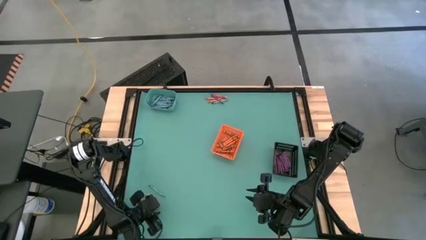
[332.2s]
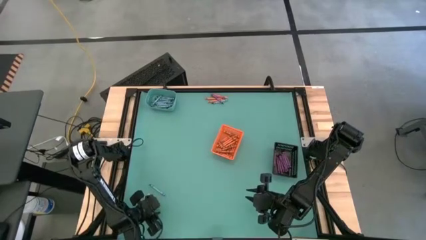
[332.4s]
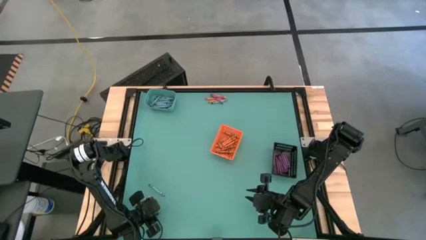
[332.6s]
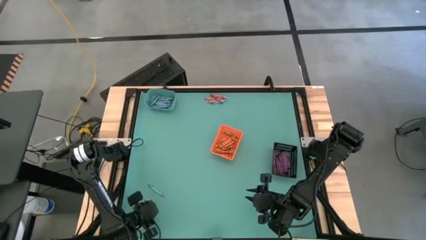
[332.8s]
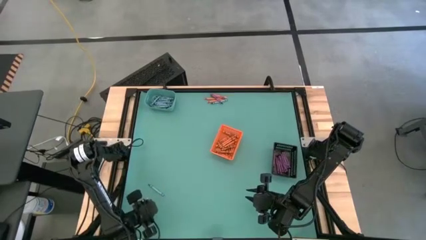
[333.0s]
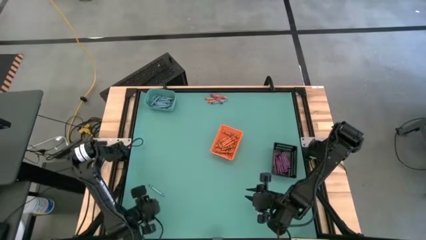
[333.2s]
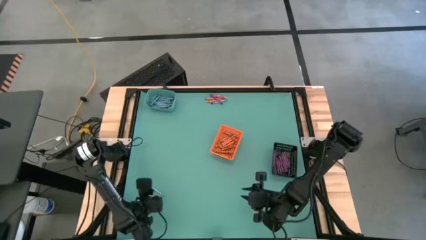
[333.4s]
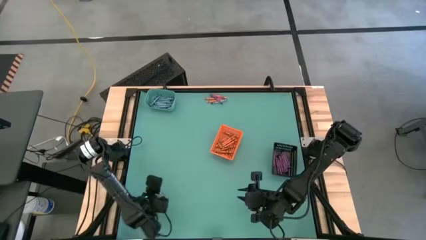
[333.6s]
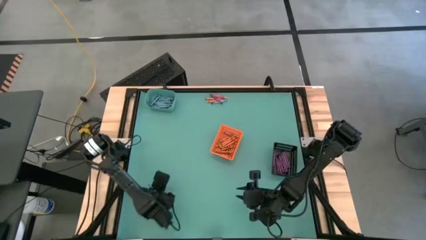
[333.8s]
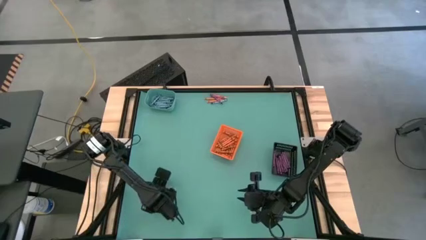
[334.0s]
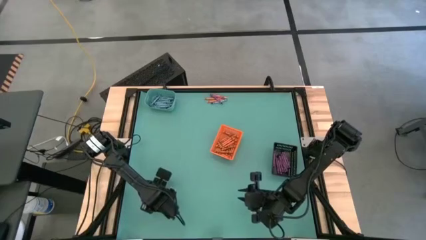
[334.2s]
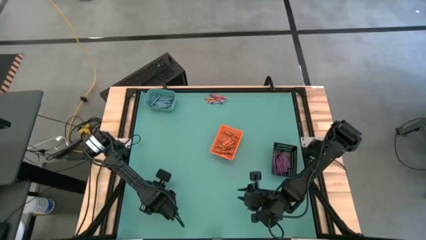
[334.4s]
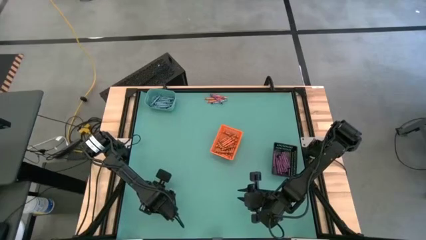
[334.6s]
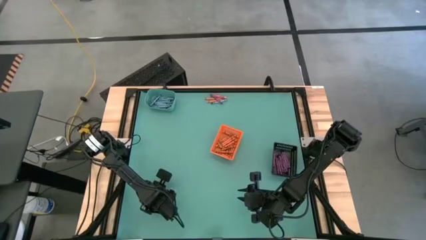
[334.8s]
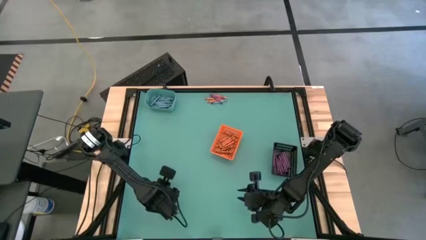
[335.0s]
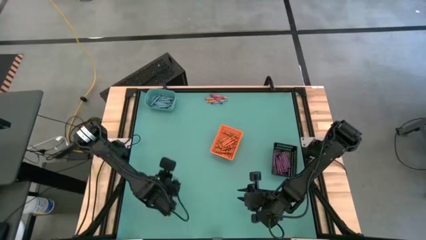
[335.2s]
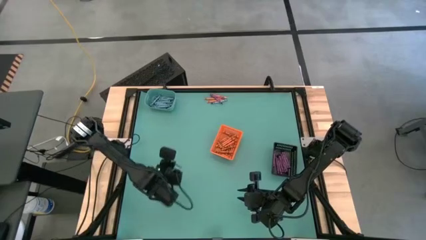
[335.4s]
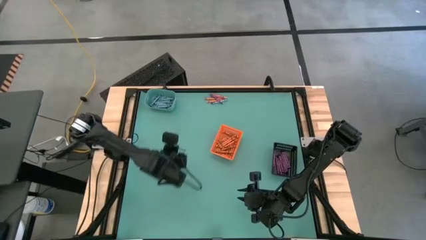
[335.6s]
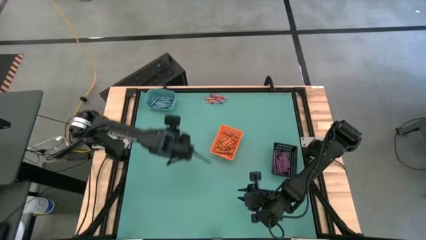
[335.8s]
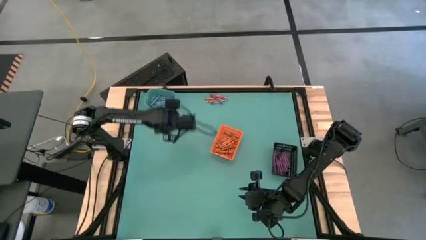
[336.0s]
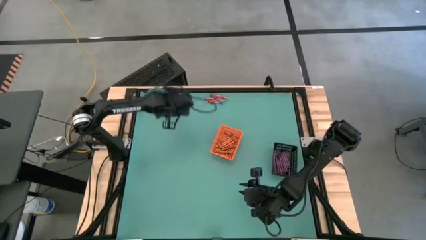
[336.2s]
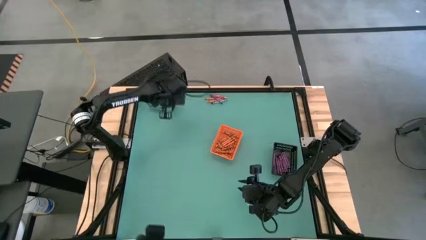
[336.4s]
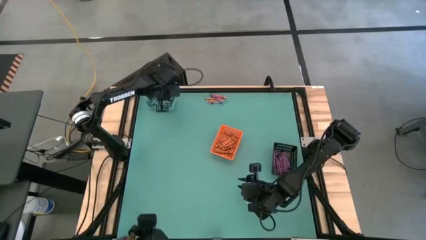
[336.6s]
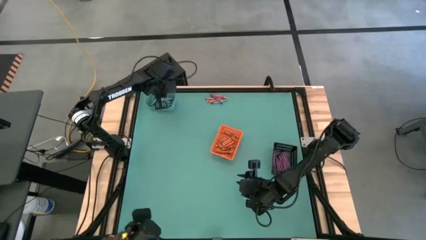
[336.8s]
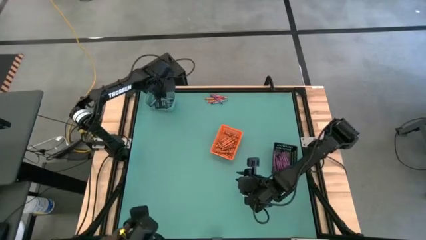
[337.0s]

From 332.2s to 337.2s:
Task: Sort crayons
Put the blue crayon into the blue bin

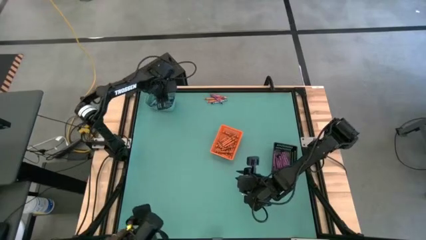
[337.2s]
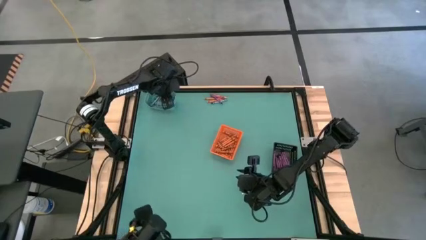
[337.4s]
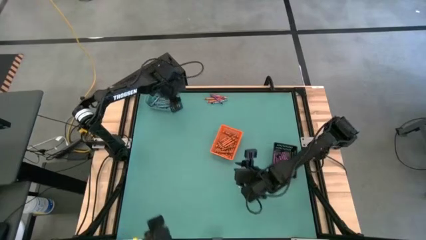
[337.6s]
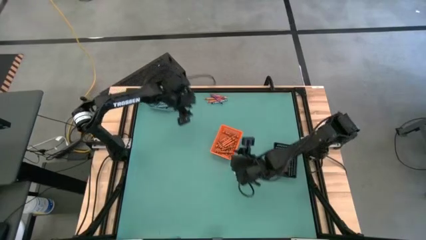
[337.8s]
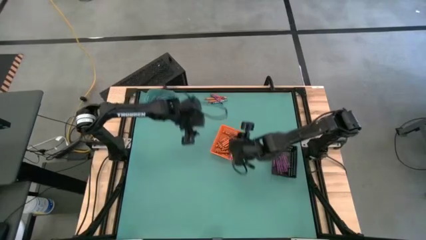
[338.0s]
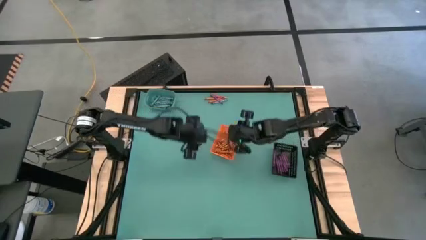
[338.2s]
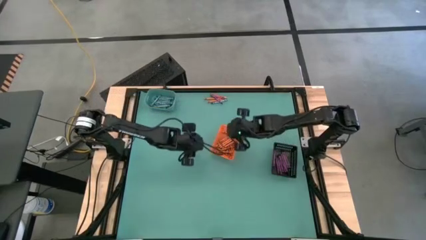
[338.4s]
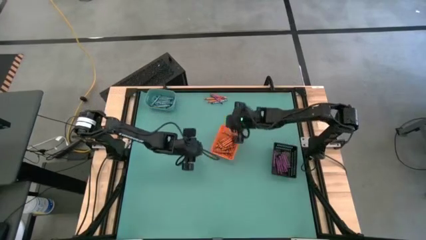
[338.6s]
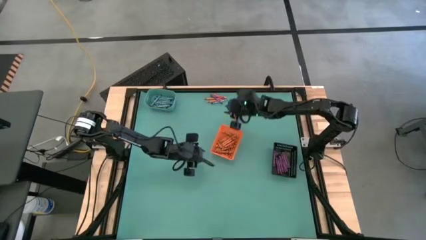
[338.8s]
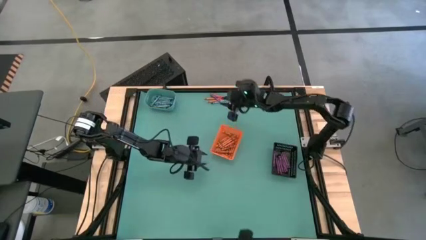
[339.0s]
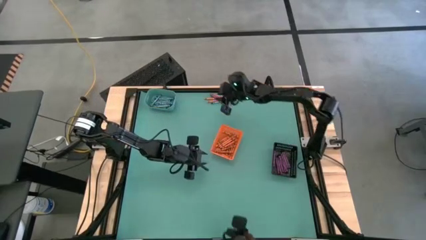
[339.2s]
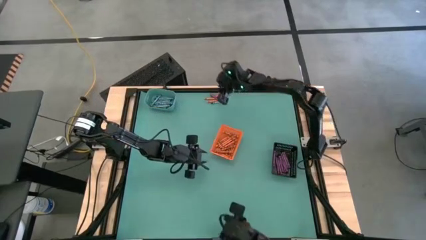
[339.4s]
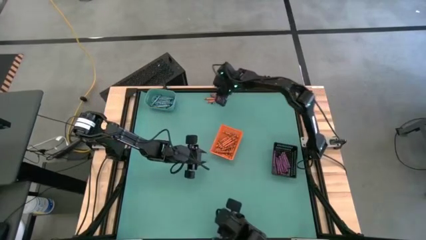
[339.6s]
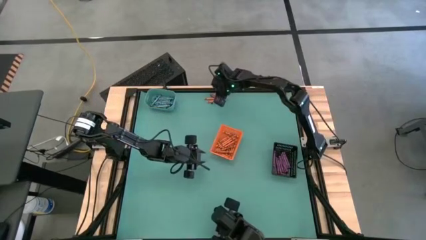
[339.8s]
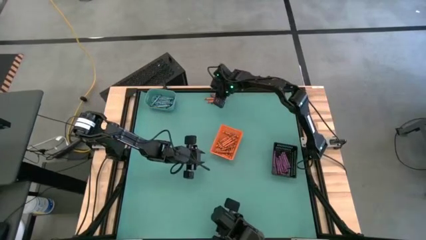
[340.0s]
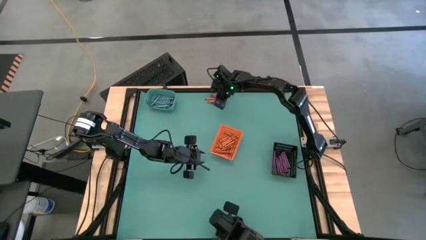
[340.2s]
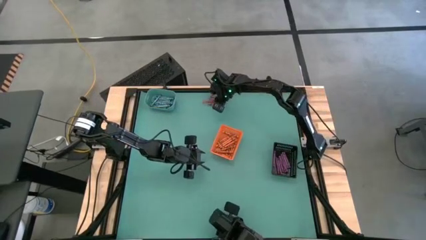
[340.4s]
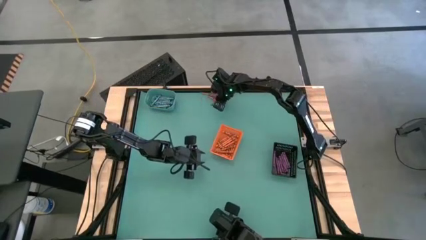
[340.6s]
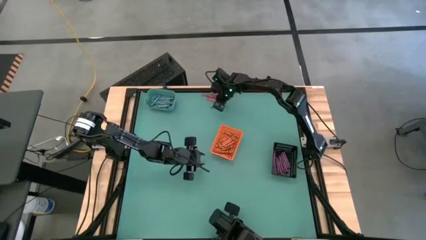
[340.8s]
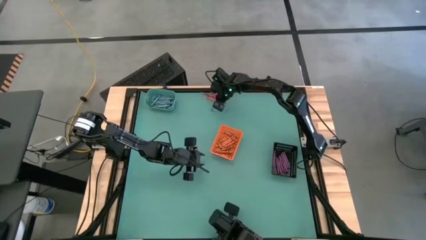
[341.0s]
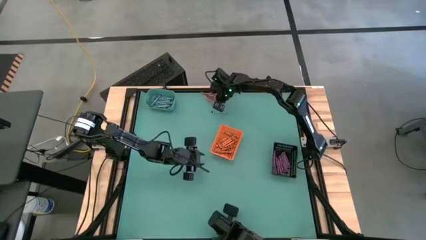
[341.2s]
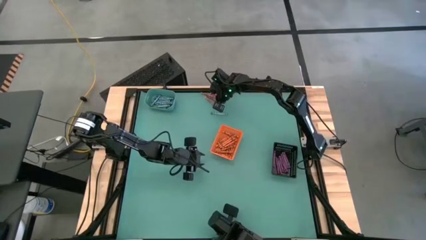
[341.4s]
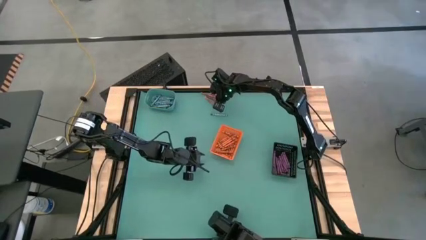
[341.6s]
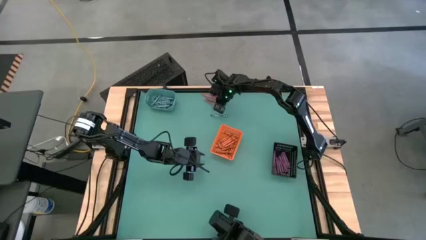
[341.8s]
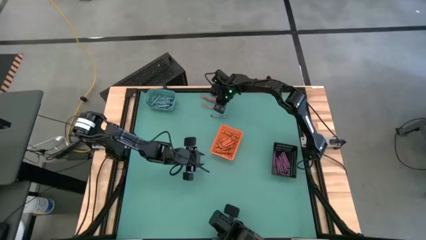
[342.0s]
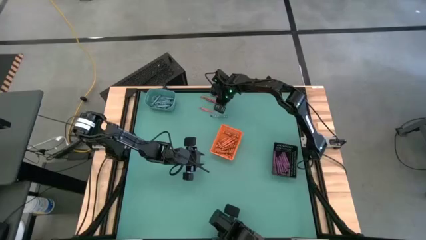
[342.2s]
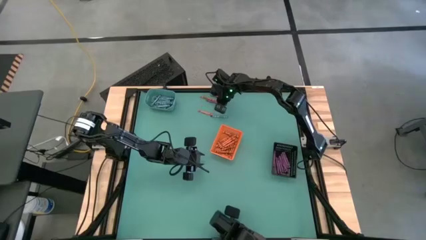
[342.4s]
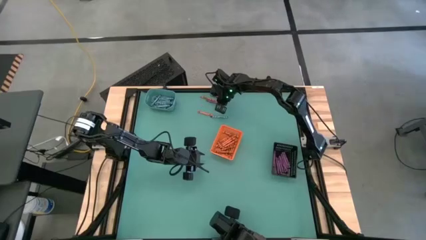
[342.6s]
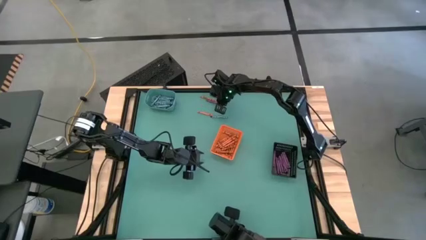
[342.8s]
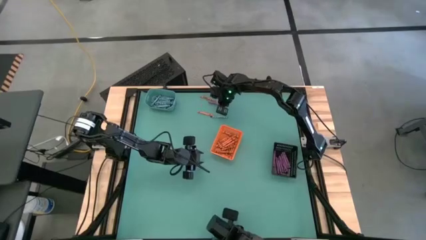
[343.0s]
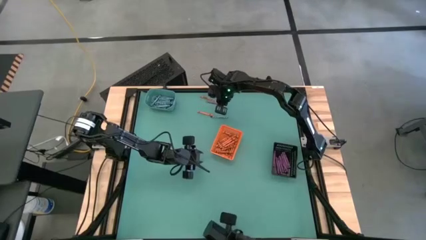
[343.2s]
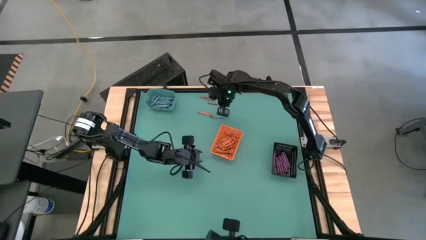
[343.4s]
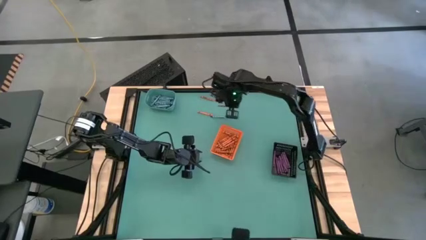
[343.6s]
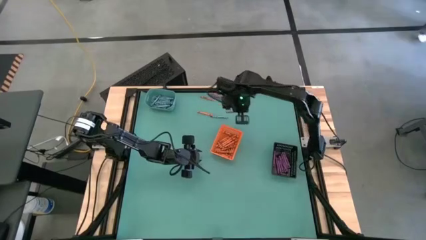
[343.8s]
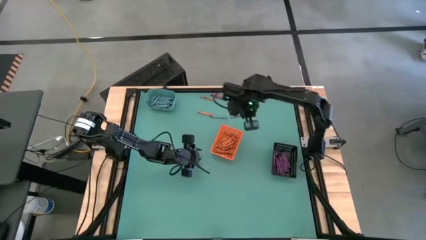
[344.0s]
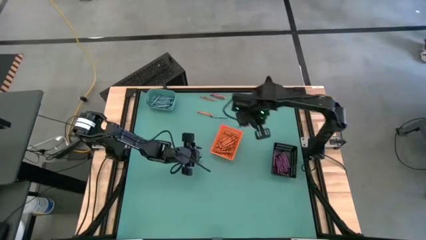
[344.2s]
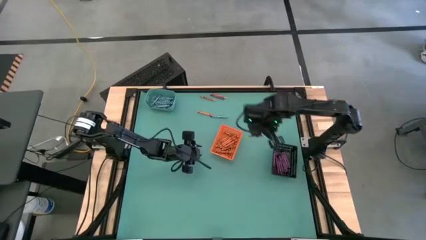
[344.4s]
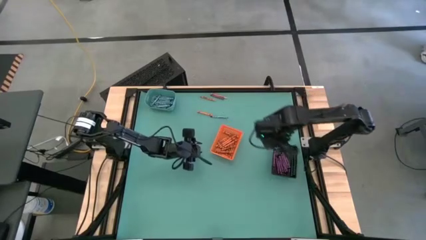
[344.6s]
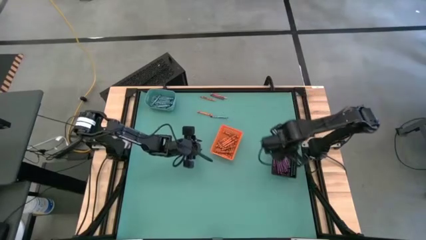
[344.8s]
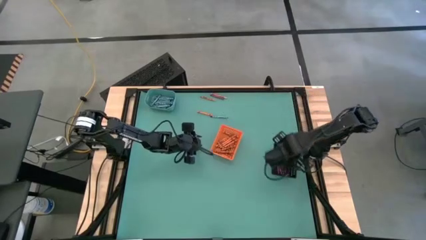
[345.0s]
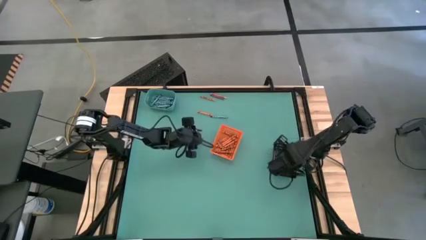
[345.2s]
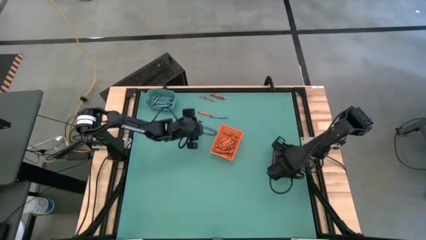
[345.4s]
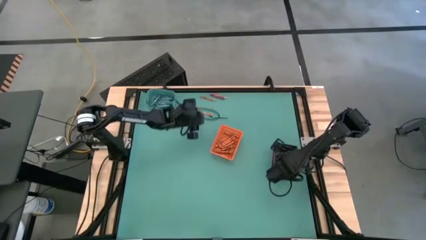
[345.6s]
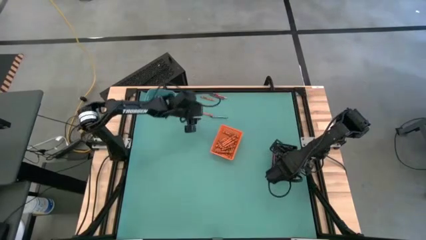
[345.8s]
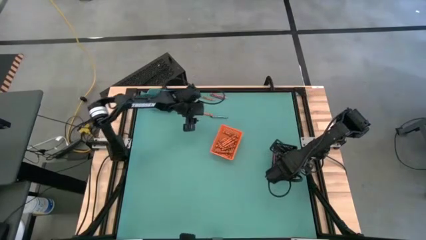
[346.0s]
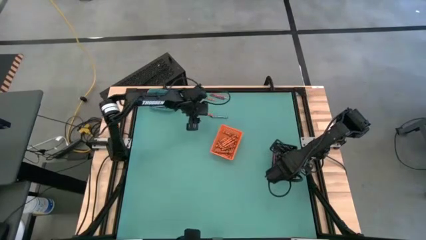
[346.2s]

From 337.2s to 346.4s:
Put the violet crayon into black bin

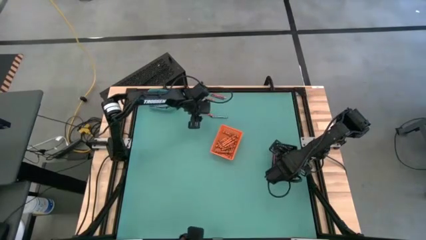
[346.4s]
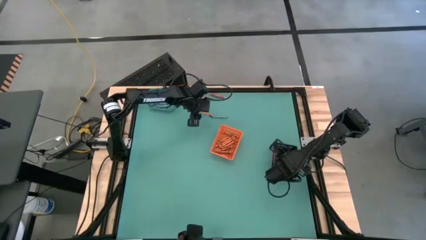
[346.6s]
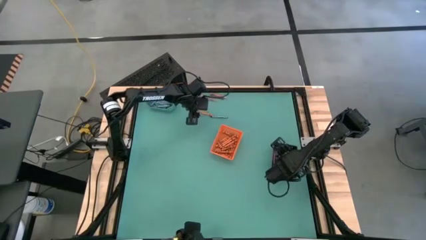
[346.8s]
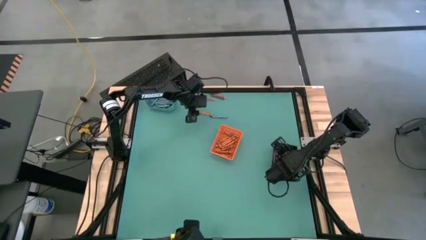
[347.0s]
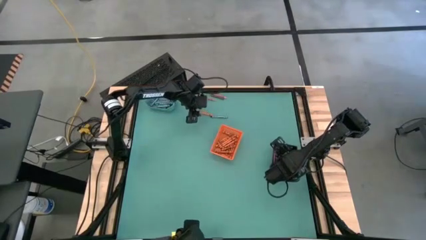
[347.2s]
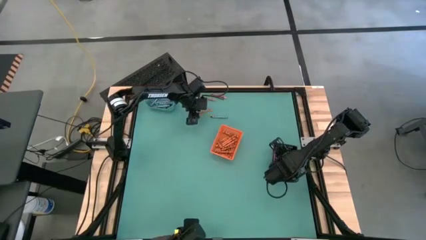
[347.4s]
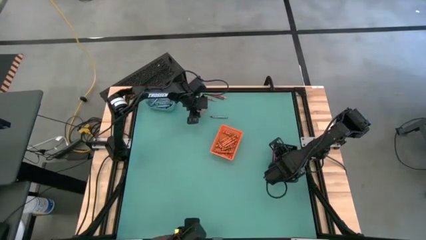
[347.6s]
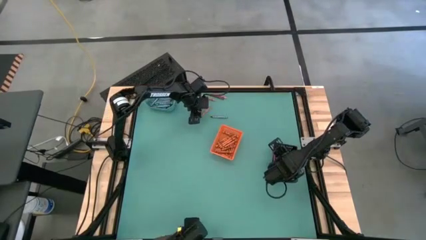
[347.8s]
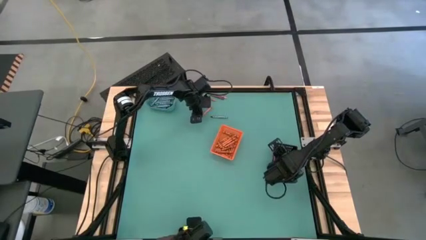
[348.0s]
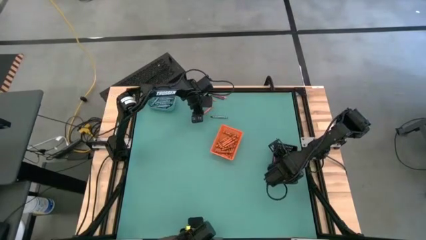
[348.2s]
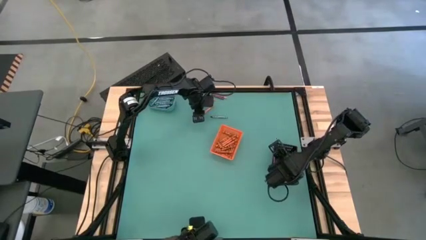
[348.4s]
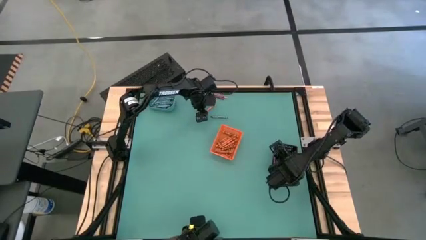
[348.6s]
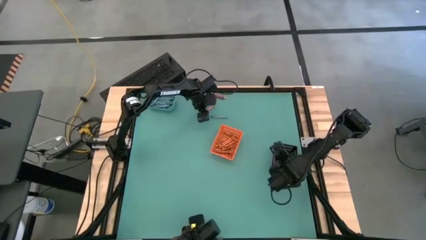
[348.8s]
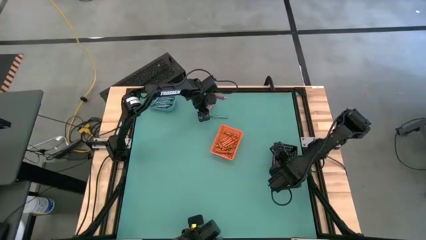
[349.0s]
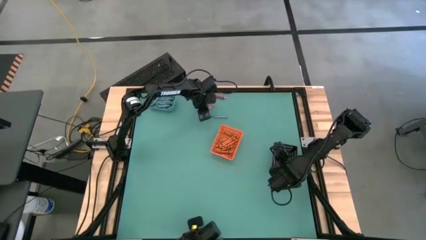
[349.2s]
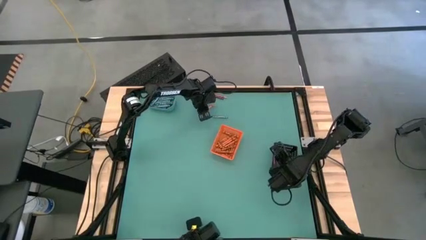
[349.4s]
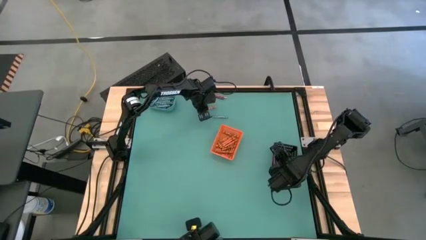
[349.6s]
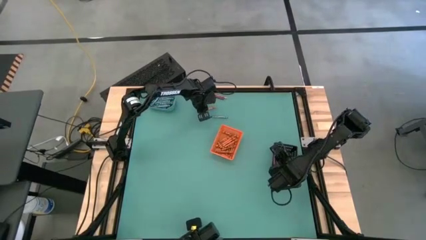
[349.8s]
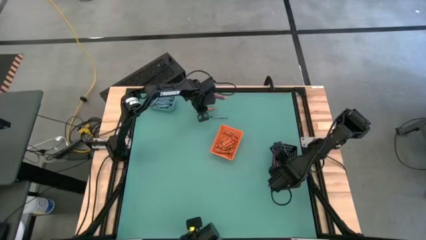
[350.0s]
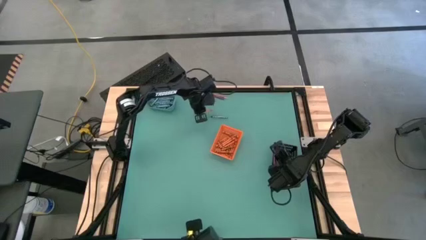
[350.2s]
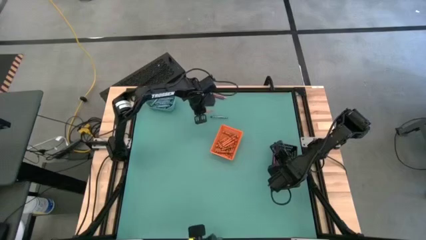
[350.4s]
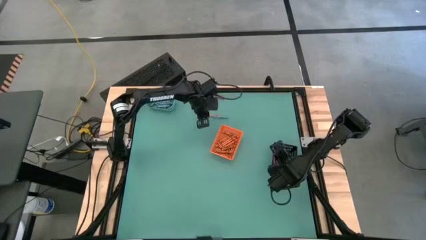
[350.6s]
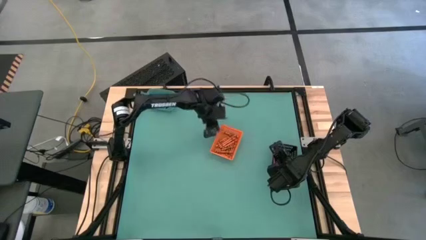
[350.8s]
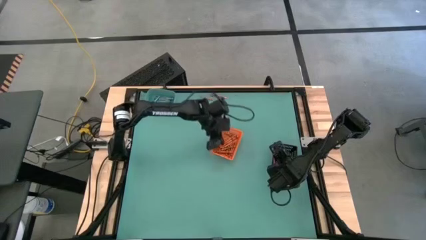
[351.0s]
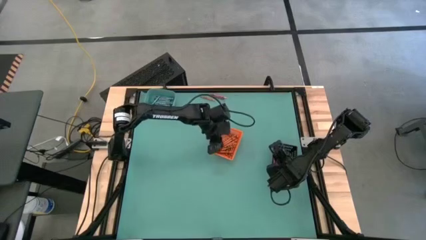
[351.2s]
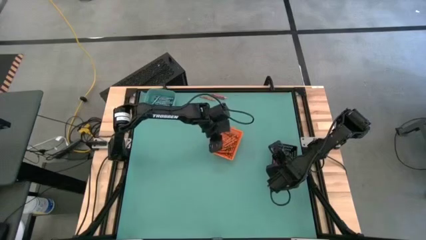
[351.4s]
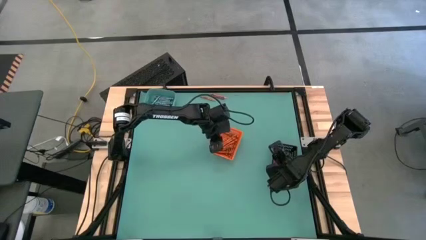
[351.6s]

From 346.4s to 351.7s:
Put the orange crayon into the orange bin
